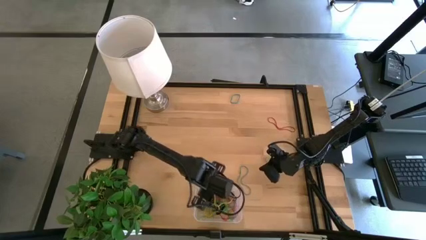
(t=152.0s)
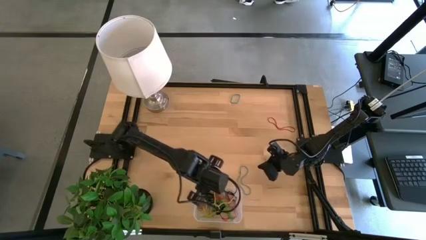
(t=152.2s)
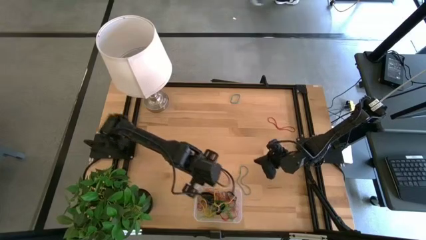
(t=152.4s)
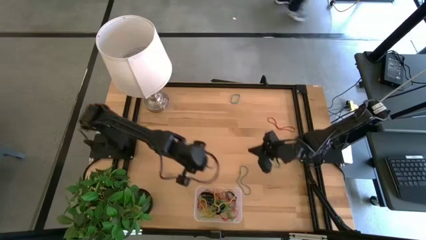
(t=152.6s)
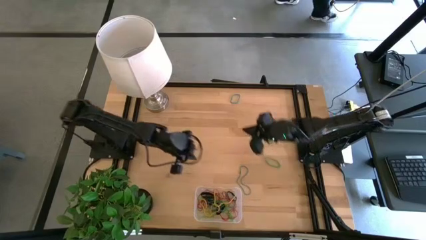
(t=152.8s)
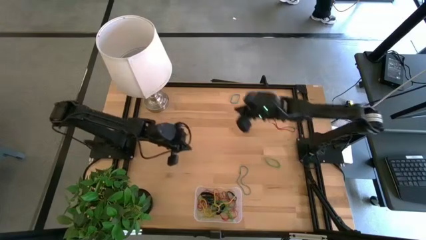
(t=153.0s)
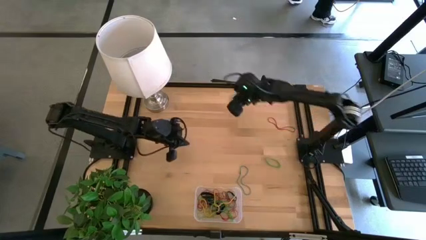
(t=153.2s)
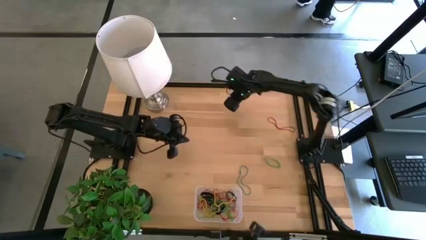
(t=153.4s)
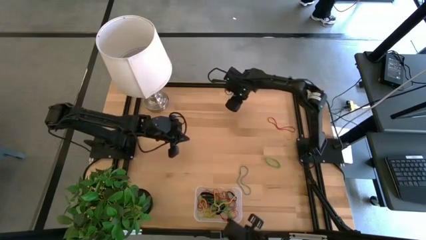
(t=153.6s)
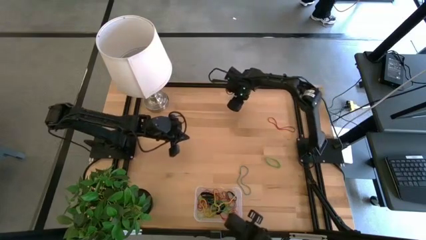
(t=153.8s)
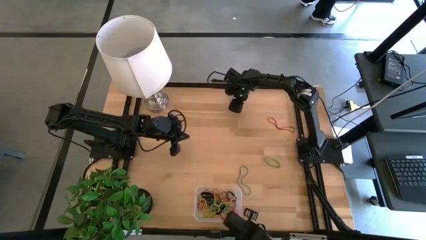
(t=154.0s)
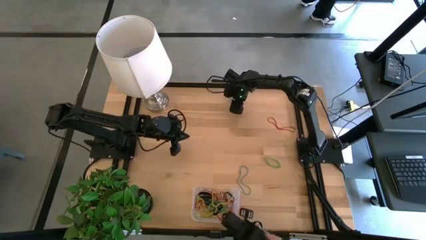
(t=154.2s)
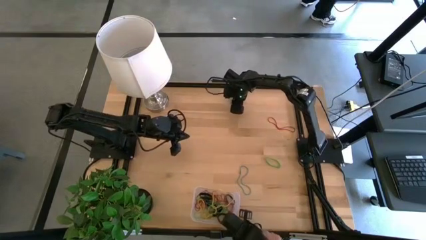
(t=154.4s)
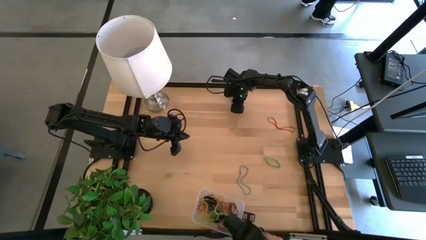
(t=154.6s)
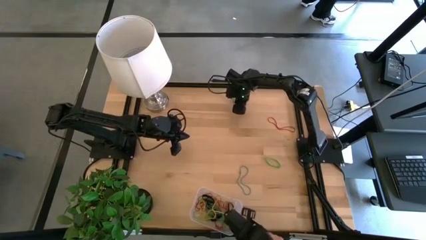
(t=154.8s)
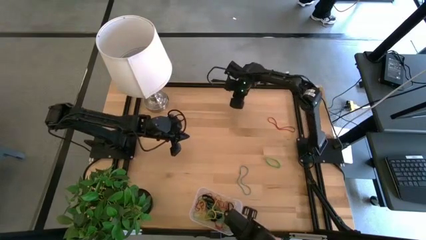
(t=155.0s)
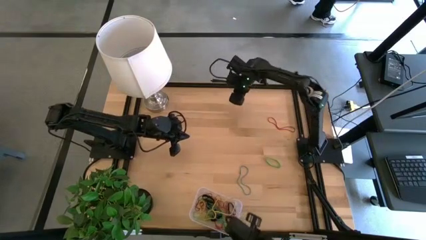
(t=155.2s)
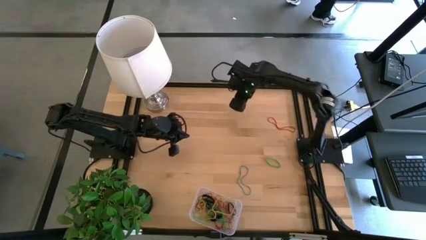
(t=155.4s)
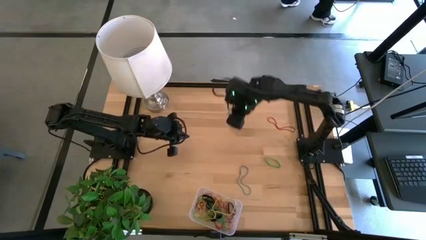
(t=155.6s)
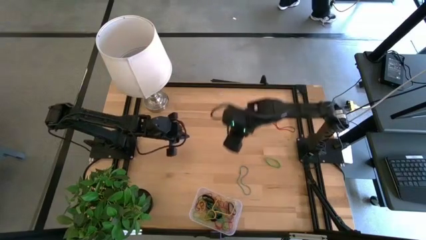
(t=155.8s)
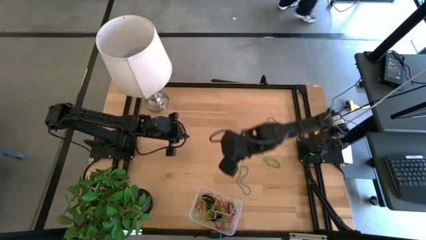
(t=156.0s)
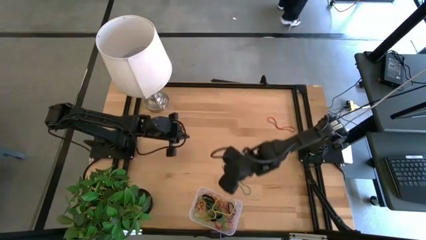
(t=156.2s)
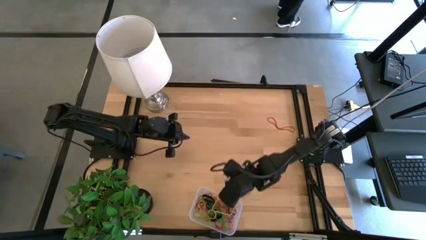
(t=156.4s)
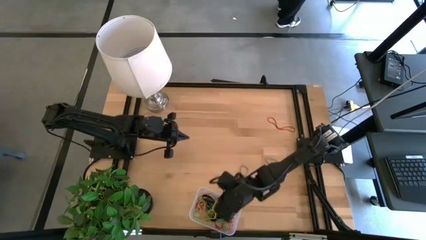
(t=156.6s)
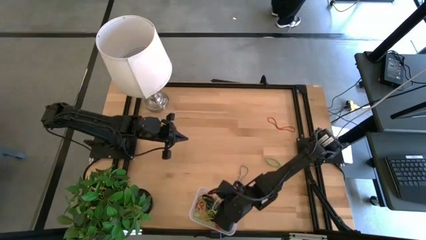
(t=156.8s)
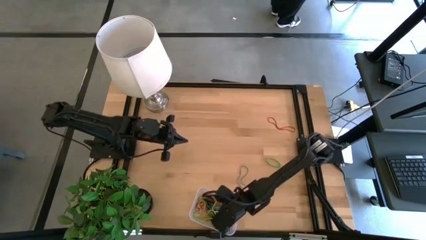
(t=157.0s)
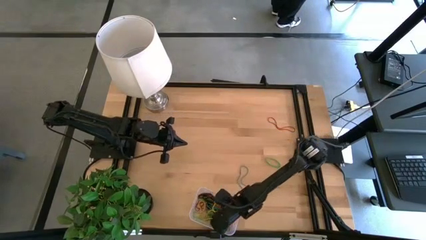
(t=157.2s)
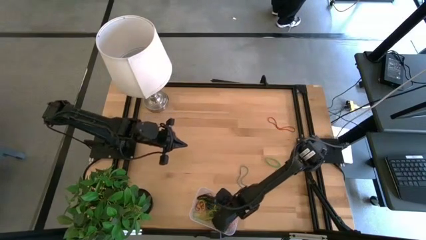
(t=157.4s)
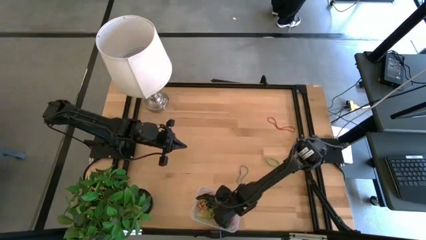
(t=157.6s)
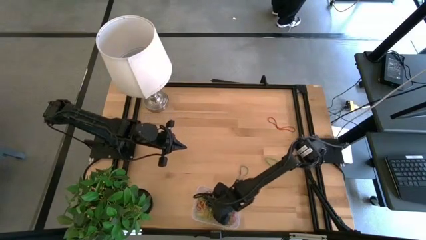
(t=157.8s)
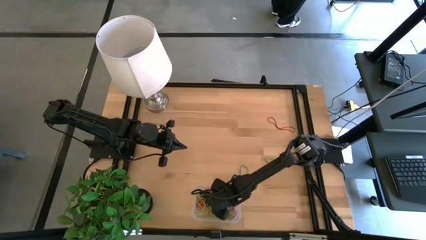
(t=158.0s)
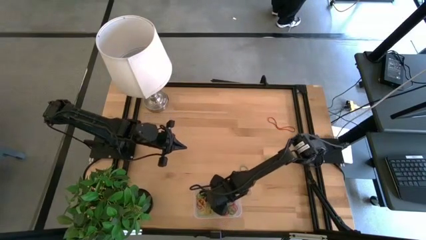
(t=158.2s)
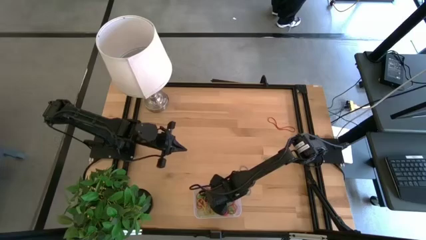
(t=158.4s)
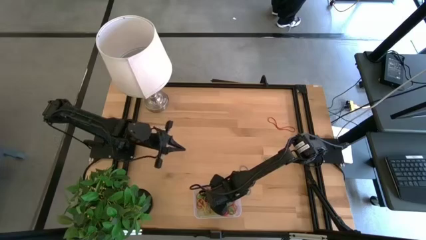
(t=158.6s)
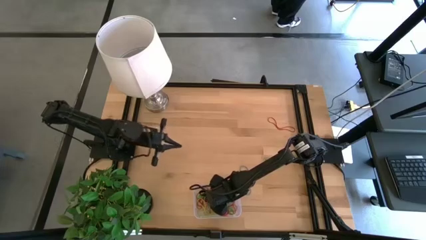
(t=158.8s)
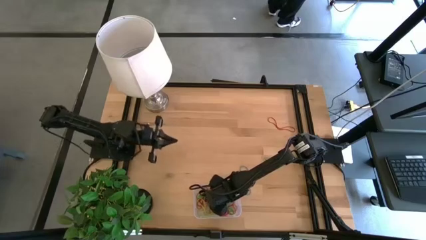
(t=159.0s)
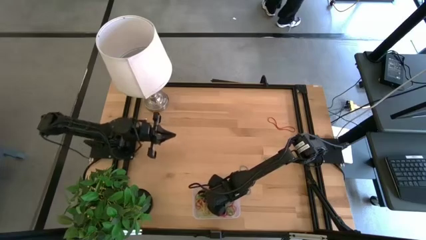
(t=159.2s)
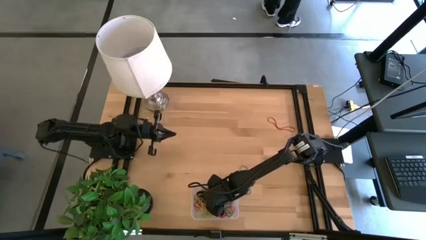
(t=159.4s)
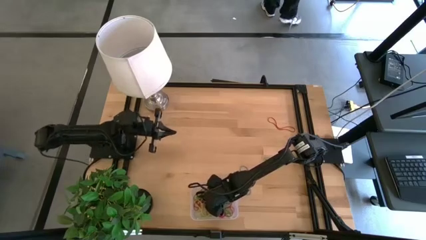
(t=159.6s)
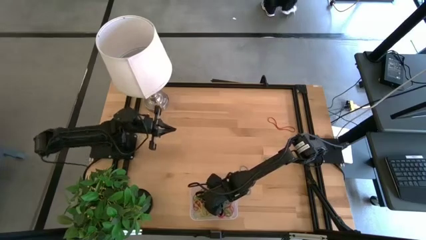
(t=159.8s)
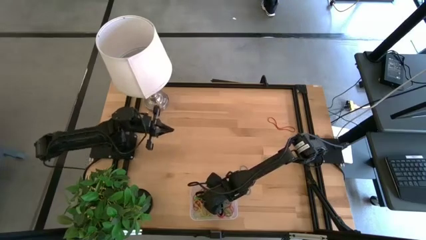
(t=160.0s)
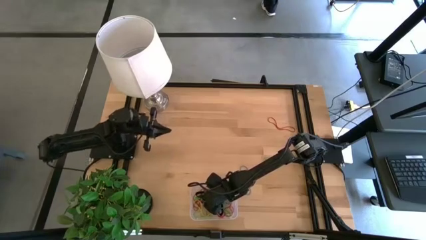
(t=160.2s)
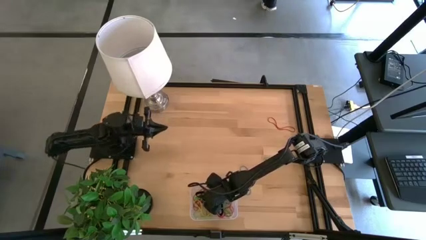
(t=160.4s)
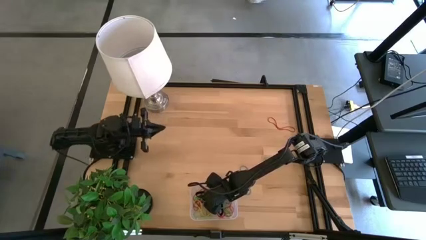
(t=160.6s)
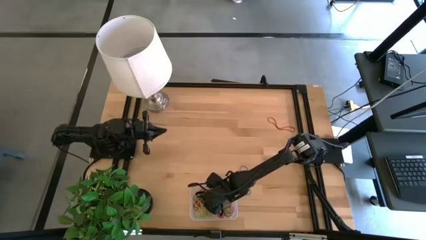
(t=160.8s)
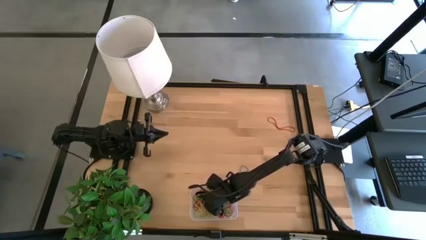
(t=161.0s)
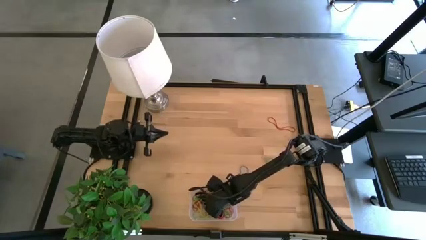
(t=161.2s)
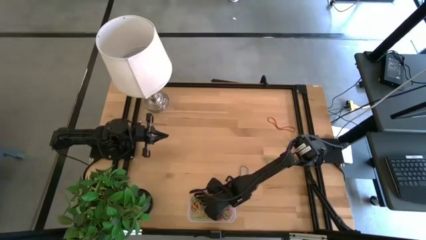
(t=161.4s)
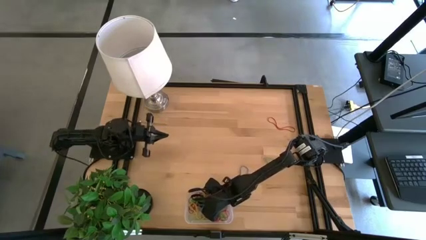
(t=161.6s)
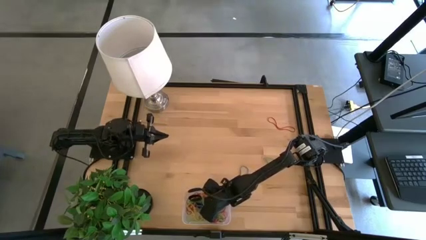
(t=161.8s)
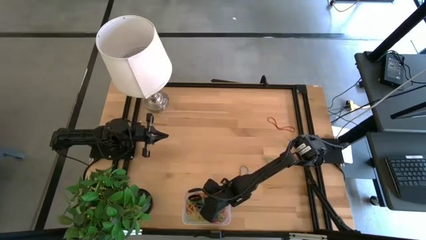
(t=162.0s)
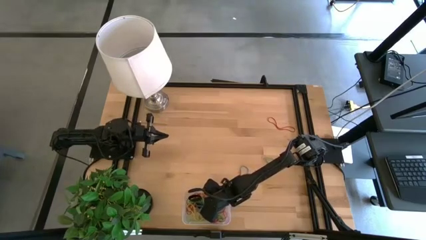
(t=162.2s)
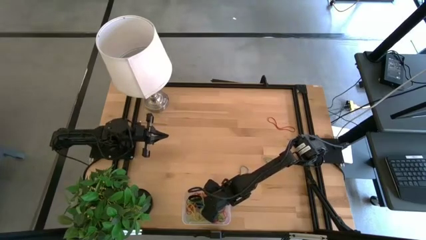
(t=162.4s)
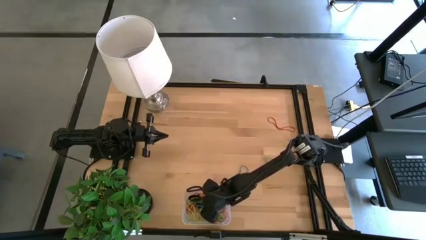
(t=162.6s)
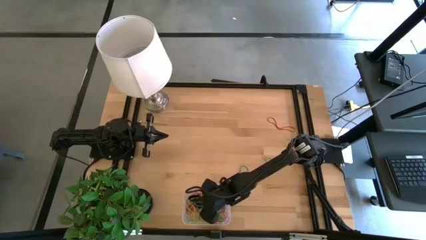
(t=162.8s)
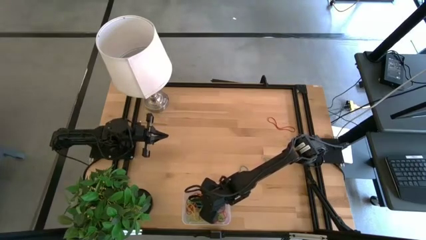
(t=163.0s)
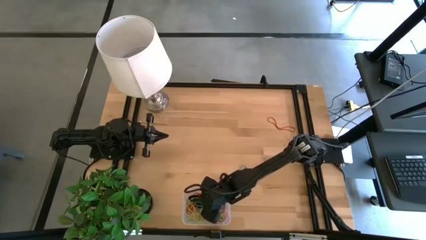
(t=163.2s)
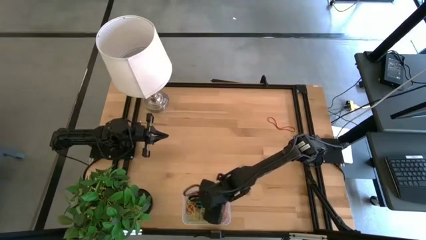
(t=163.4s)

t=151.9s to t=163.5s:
Task: Pick and place rubber bands into bin
Put the blue rubber band into the transparent bin

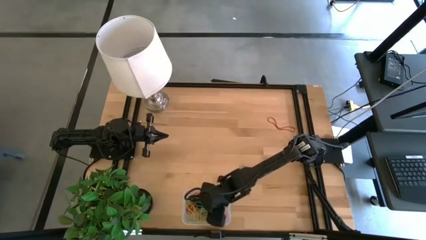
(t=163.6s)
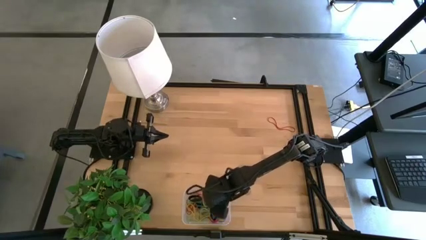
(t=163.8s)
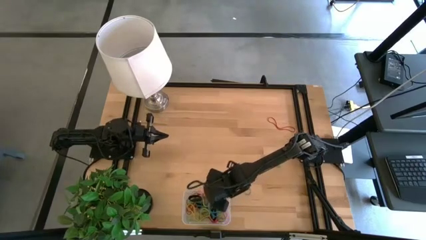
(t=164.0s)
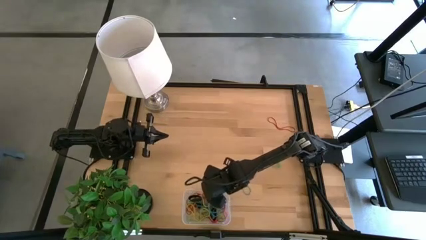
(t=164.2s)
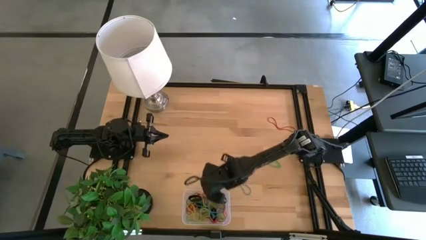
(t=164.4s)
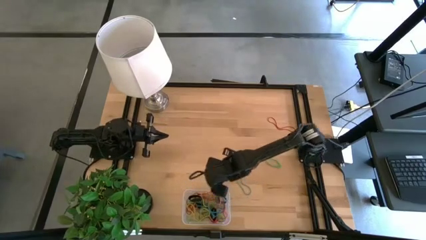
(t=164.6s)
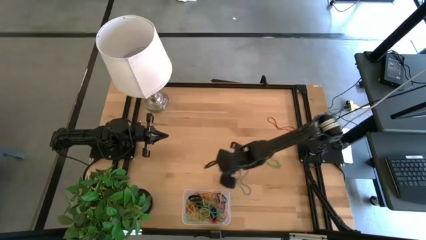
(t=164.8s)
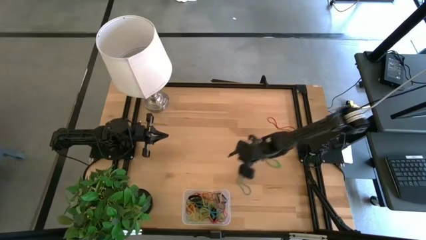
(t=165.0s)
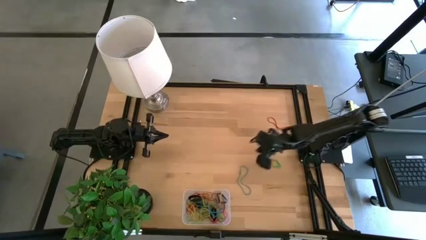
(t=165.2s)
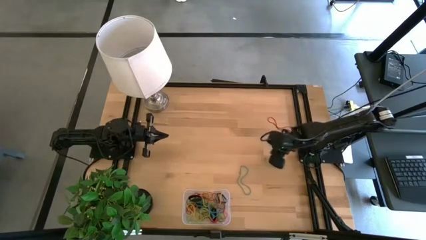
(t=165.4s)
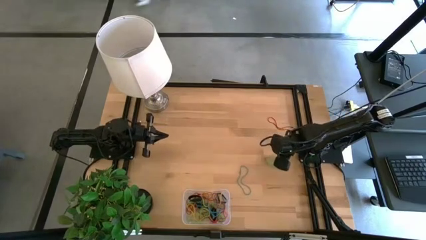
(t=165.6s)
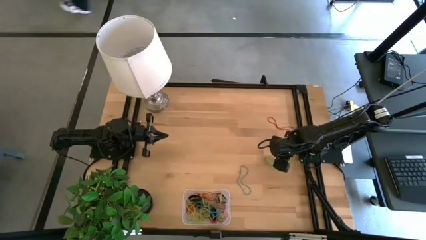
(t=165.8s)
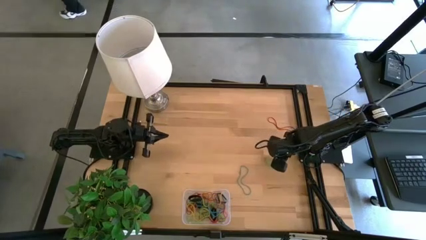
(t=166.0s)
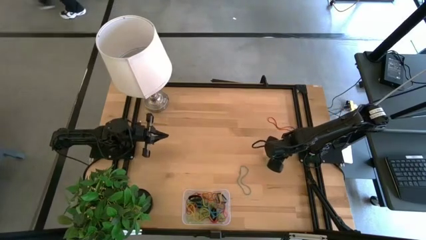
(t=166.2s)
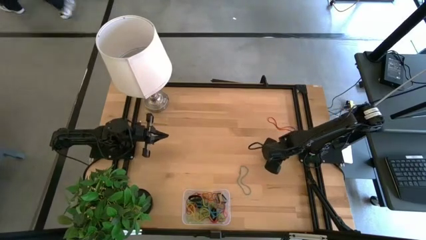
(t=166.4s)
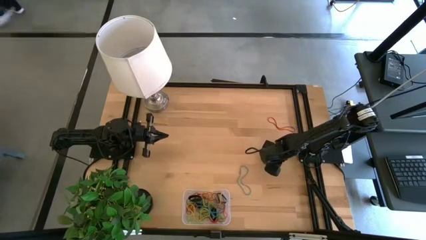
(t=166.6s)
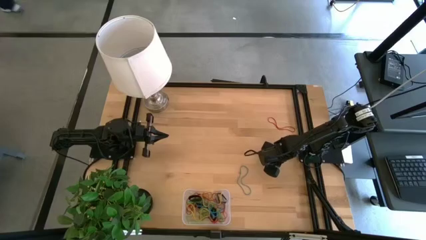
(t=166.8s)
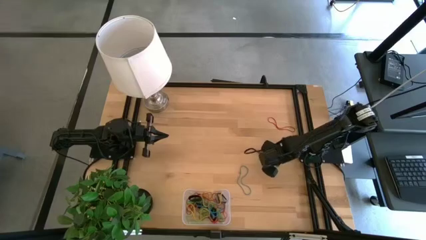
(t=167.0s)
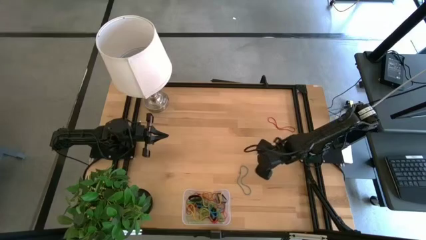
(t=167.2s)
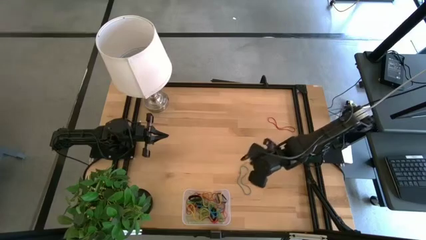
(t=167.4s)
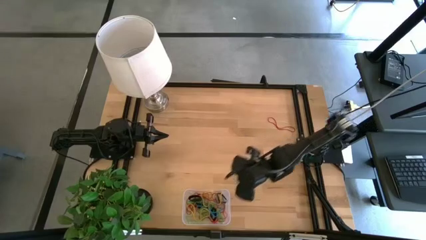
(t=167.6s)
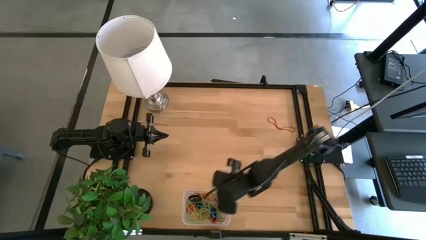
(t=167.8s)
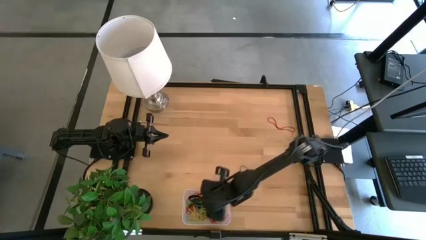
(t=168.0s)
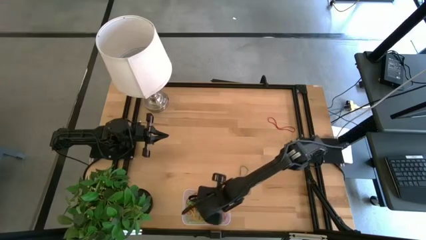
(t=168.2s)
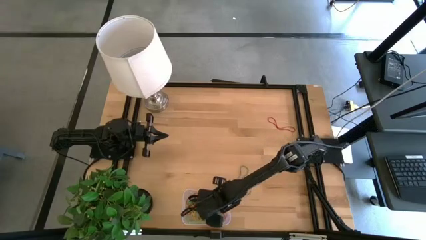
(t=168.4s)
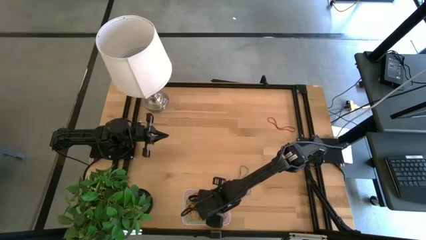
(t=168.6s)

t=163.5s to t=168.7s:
Put the green rubber band into the transparent bin
